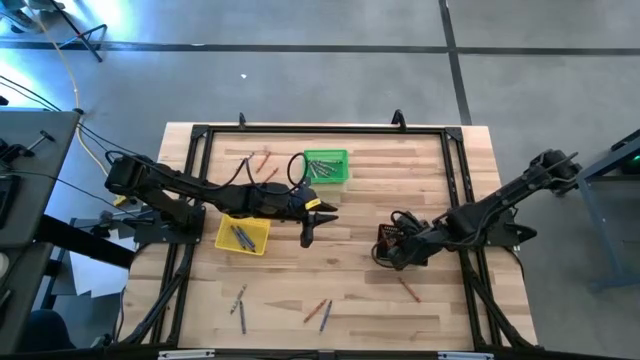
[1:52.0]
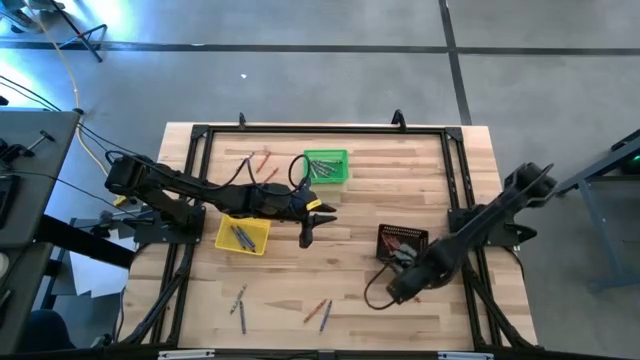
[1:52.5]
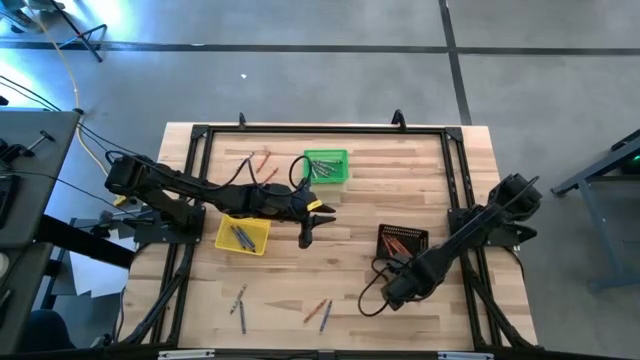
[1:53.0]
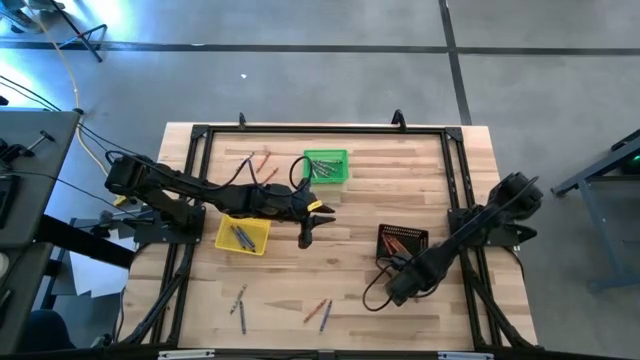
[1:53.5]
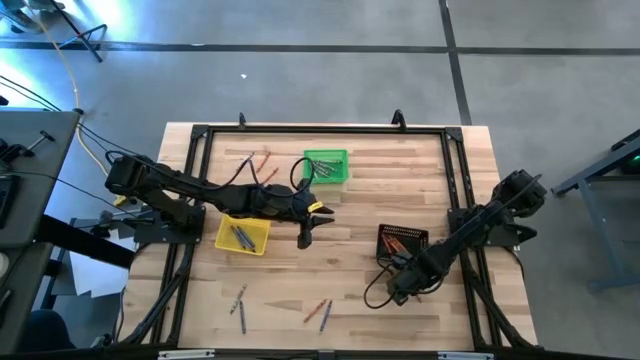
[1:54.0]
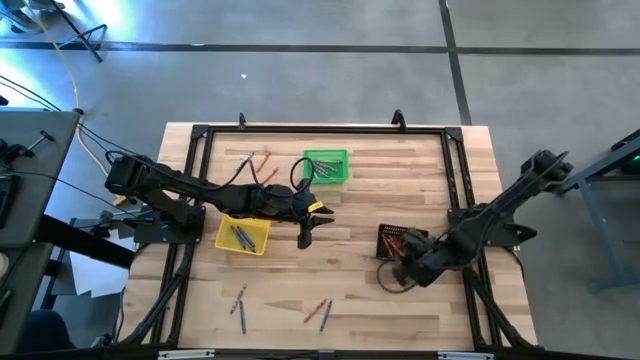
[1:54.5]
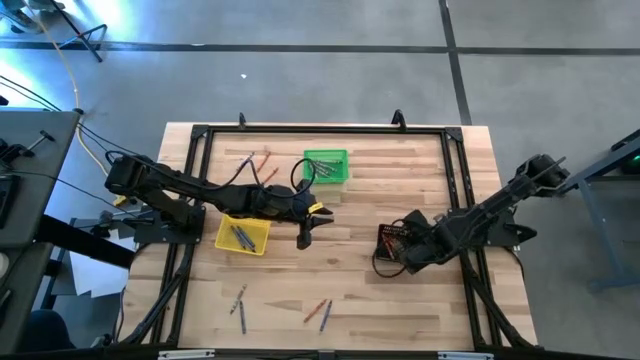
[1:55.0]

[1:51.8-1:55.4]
Task: Sort crayons
Put the orange crayon into the black bin

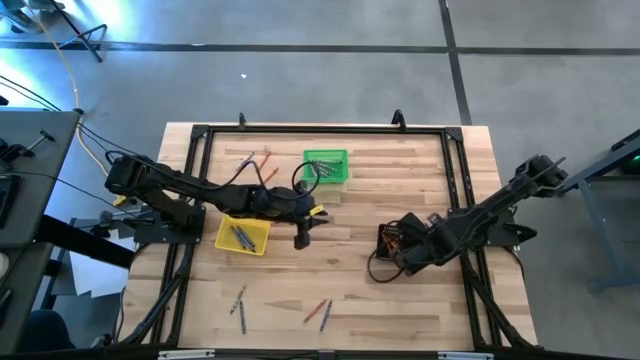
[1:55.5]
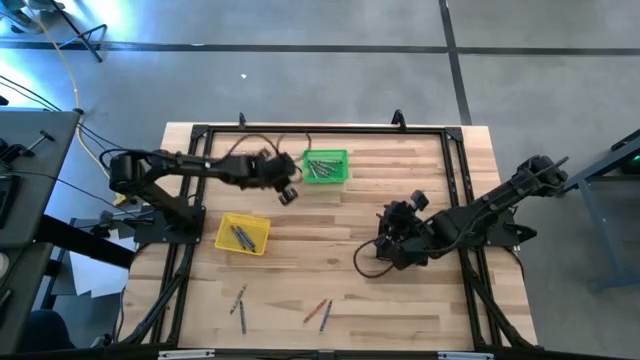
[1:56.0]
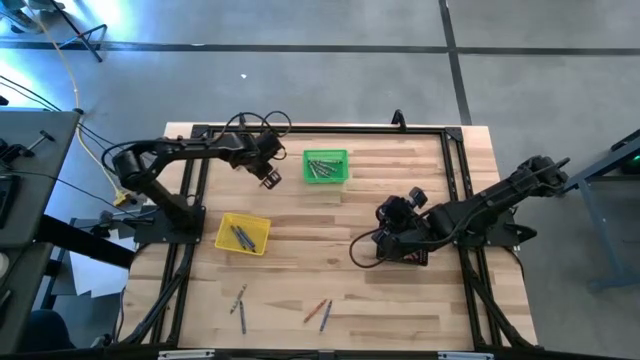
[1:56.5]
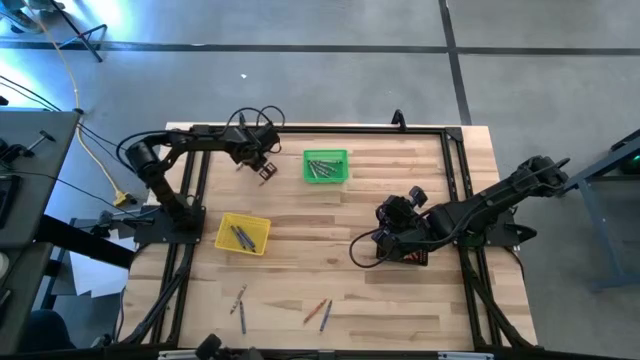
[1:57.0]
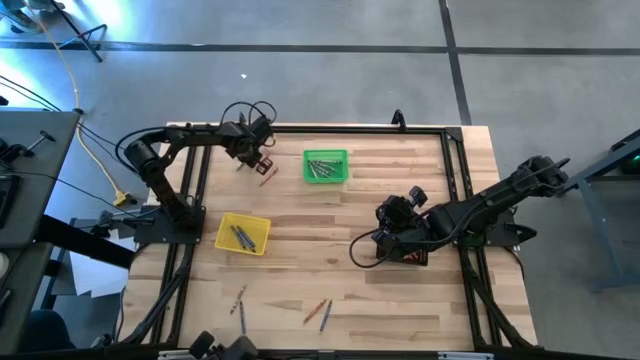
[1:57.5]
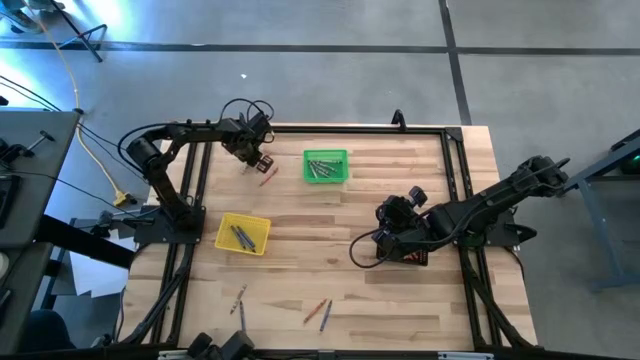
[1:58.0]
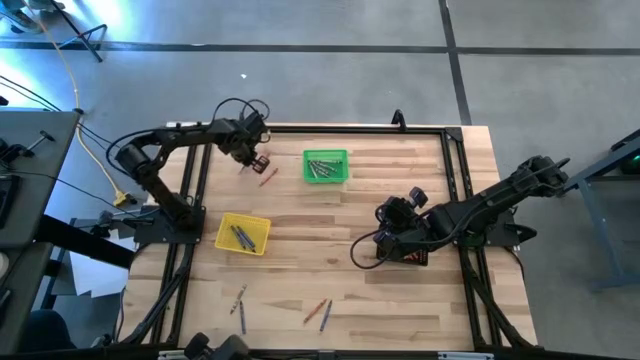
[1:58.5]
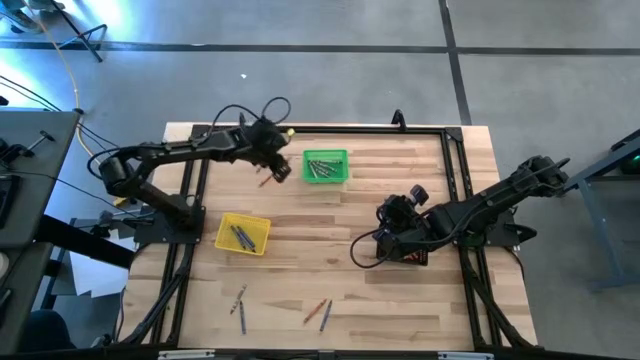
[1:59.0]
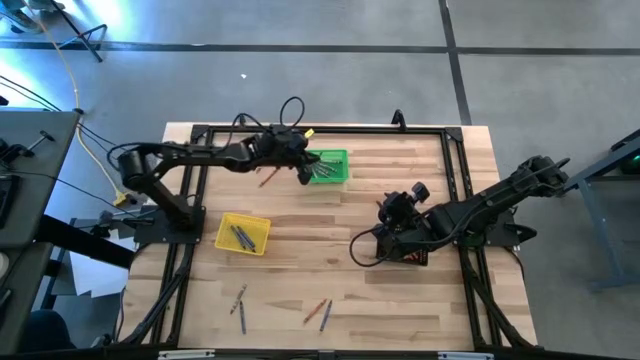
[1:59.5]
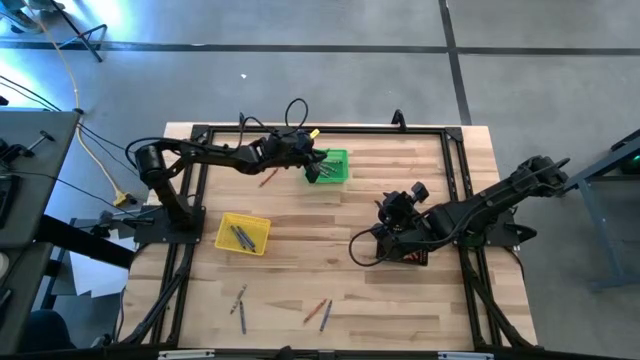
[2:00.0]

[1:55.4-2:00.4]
Put the gray crayon into the green basket

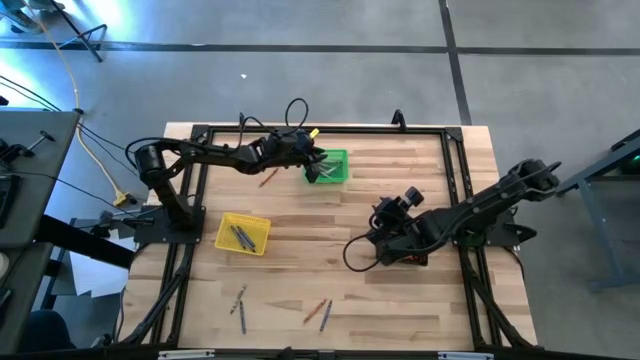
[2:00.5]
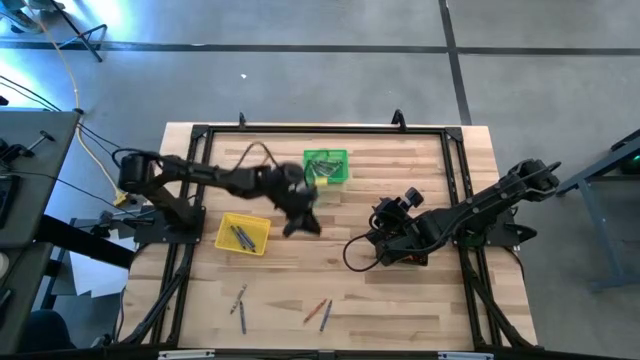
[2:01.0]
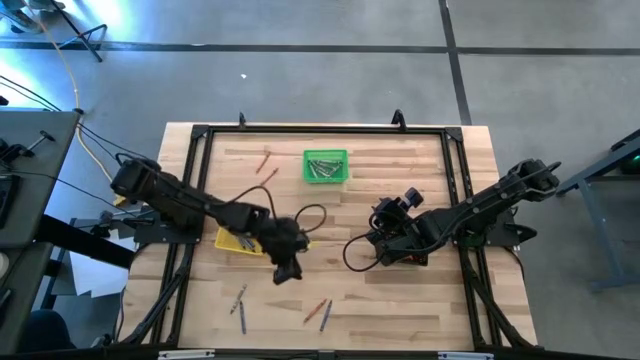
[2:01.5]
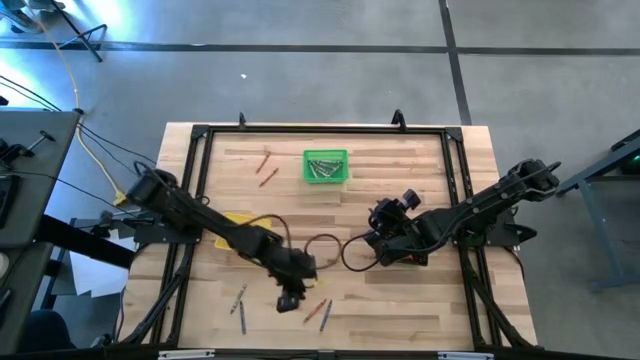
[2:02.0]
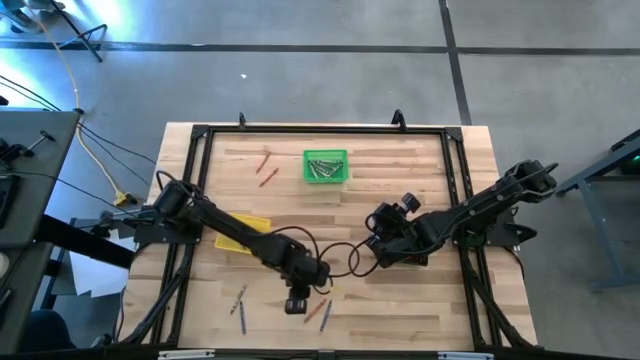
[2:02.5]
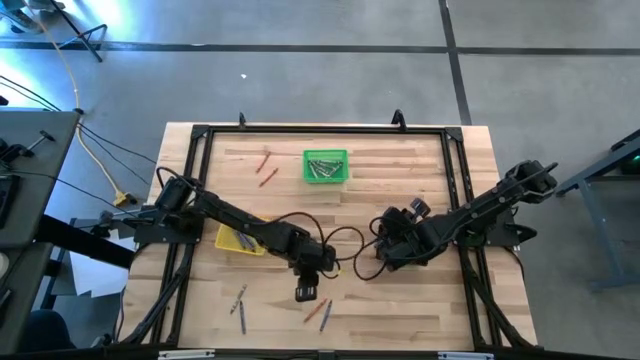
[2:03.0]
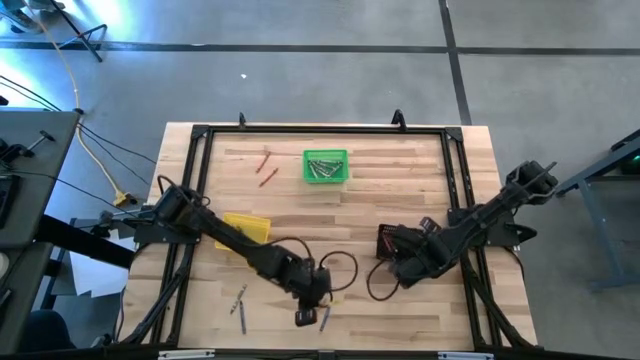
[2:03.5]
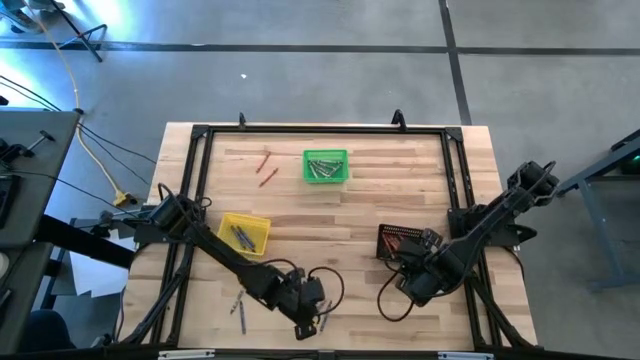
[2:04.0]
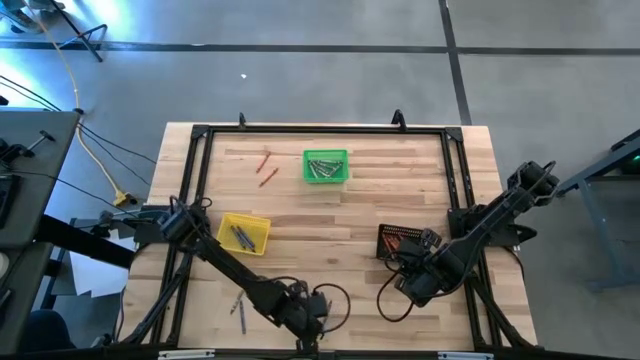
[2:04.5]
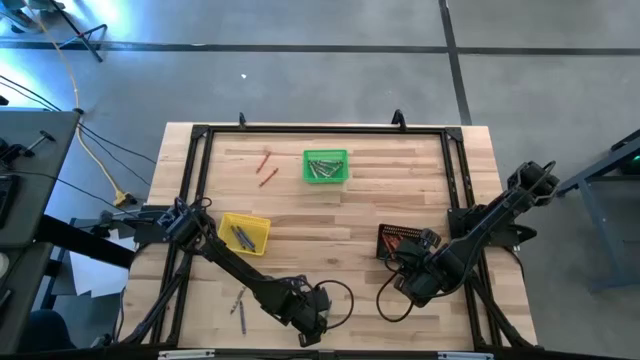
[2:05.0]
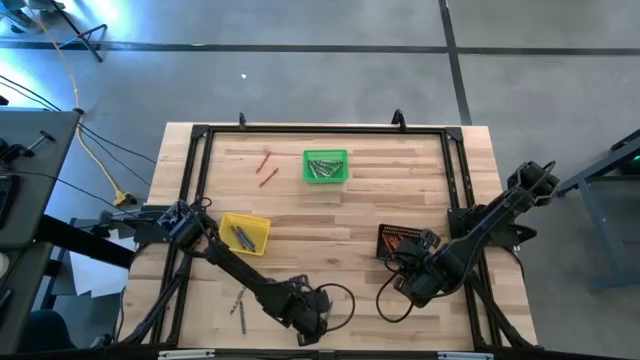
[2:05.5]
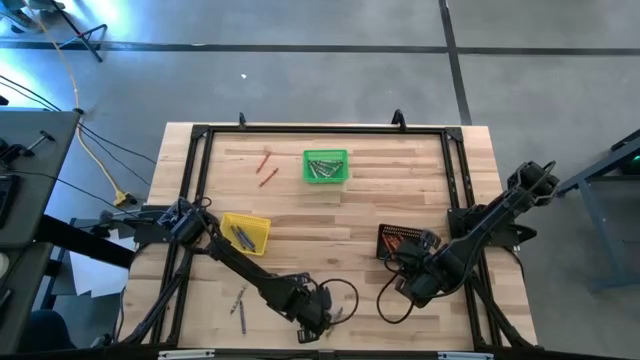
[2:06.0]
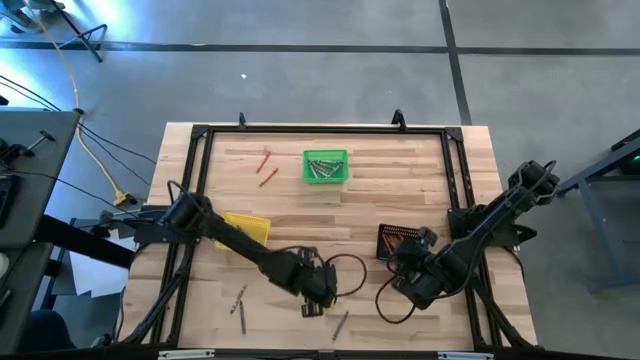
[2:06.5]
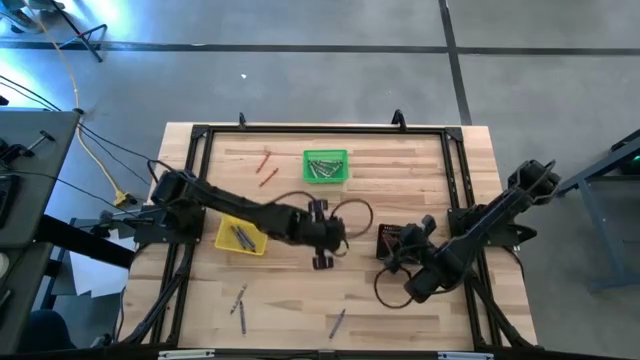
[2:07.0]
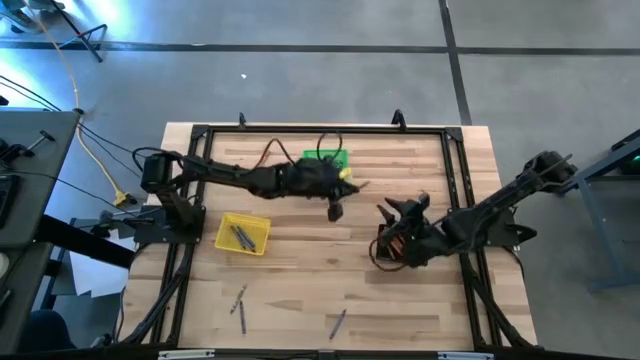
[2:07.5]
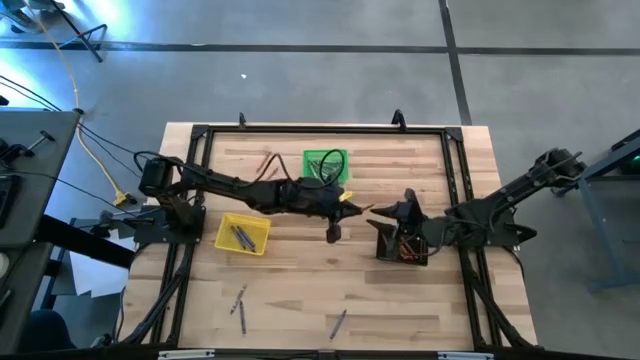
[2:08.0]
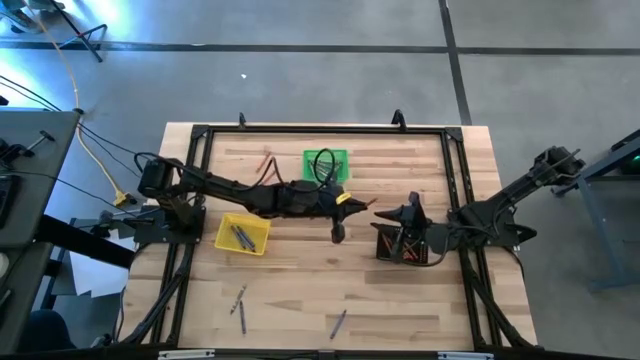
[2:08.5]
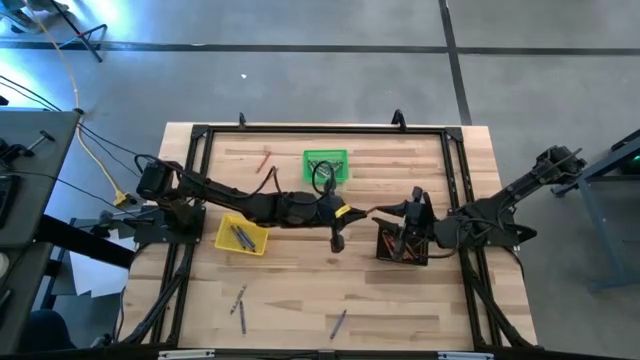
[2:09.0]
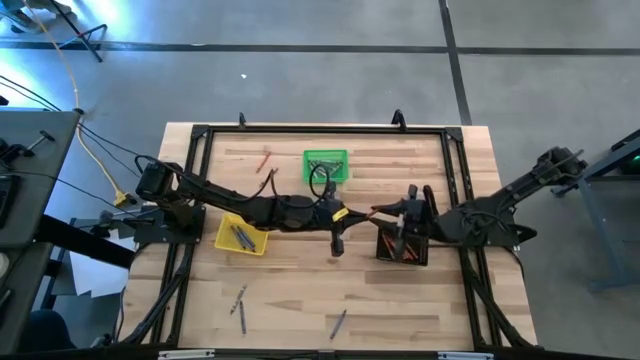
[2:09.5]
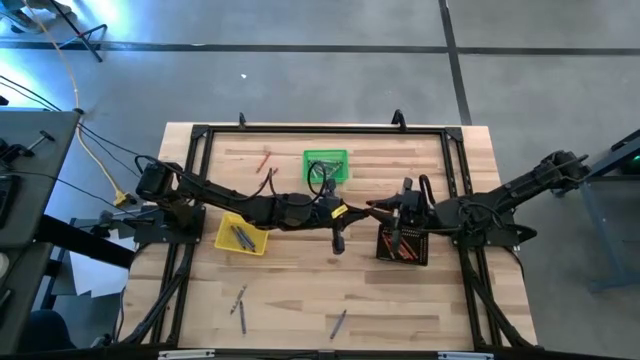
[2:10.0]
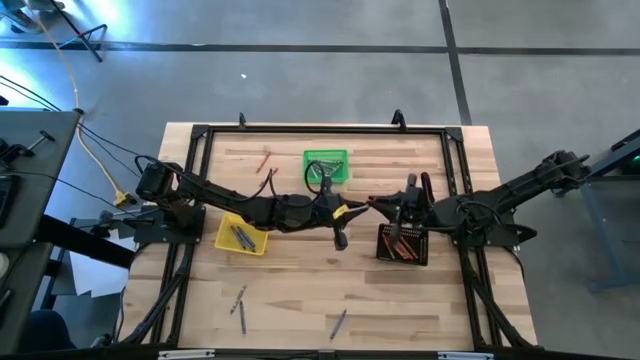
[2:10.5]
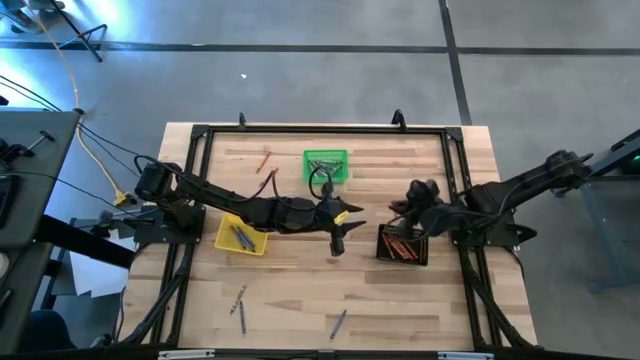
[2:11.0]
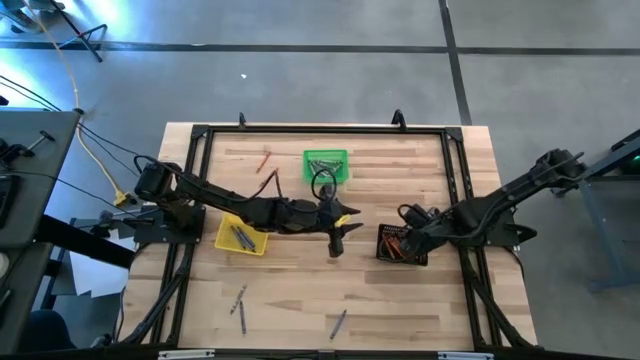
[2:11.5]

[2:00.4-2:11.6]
Put the orange crayon into the black basket

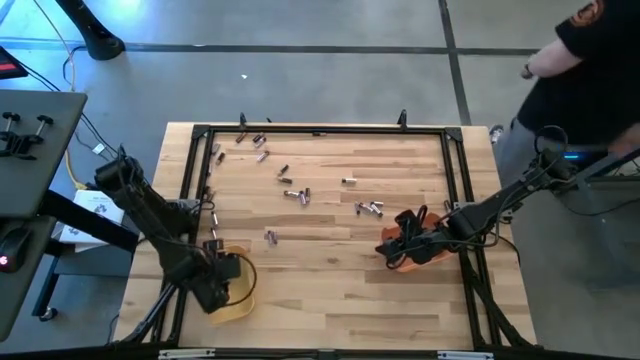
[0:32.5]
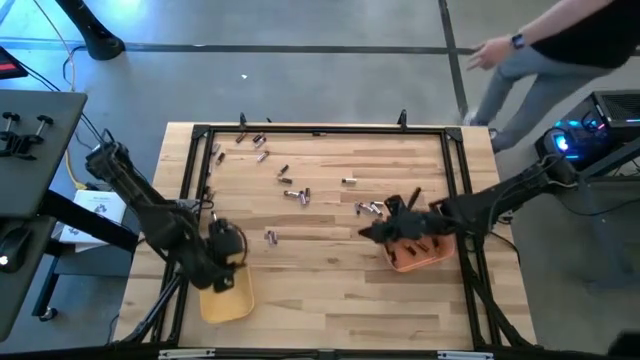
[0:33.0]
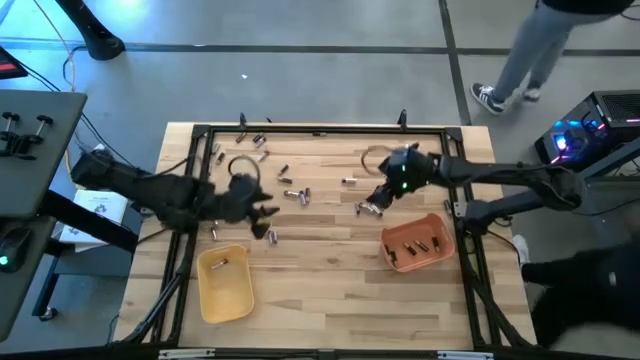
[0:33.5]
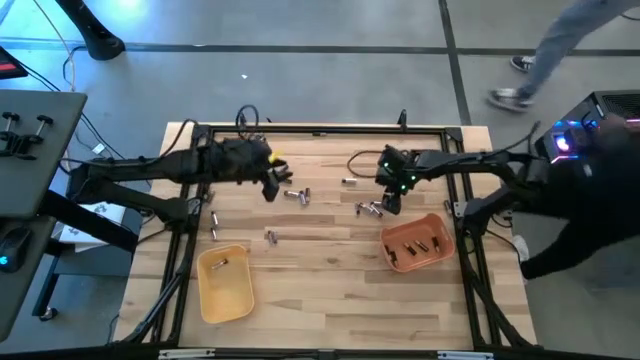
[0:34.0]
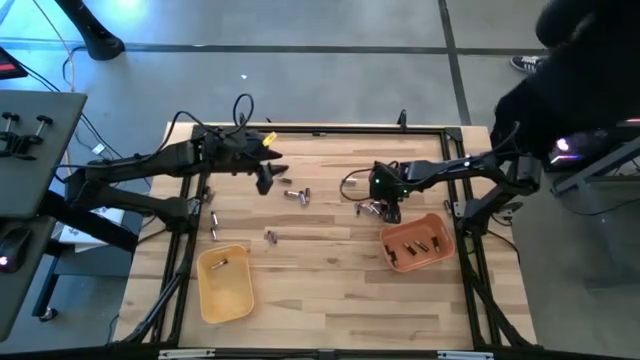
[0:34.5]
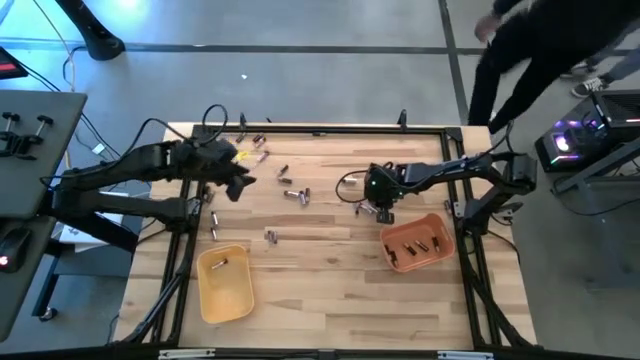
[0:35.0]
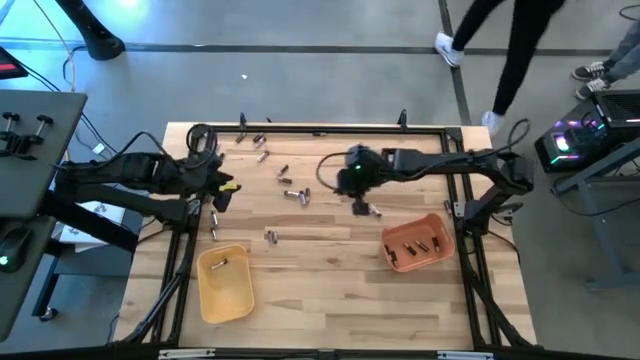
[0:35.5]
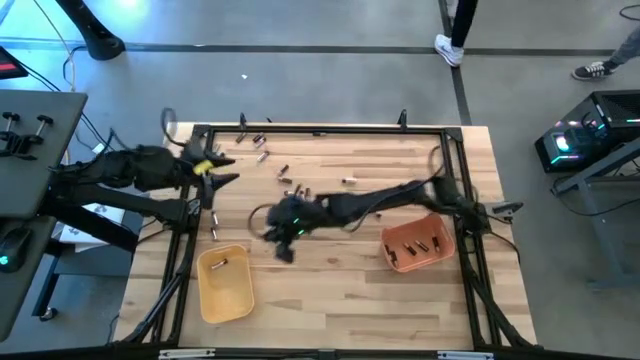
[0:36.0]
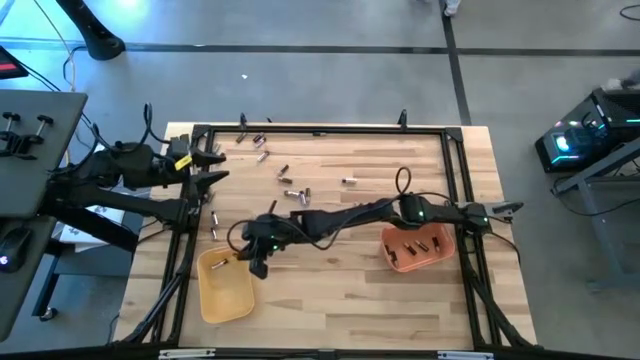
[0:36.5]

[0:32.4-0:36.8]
Task: Sort batteries
Put the silver battery into the yellow bin
